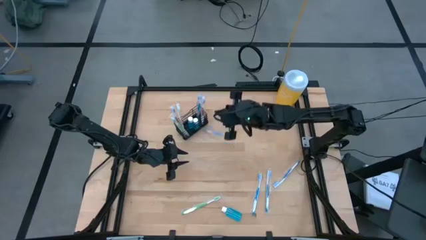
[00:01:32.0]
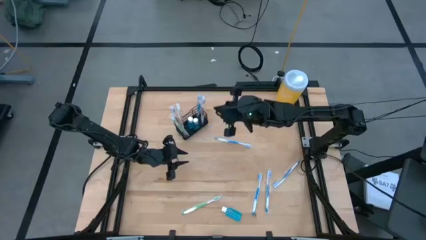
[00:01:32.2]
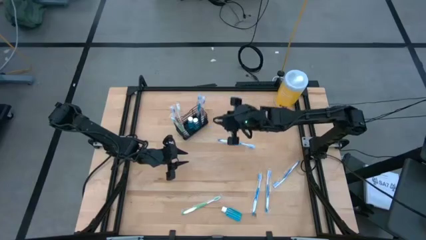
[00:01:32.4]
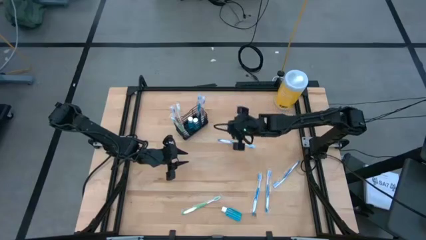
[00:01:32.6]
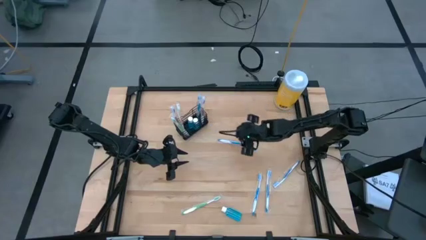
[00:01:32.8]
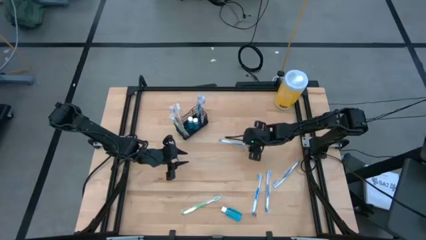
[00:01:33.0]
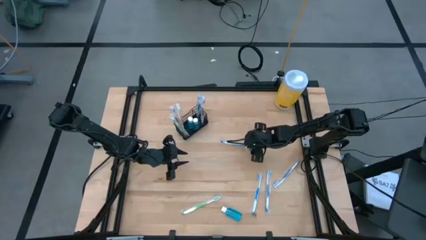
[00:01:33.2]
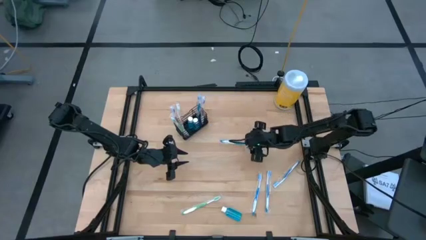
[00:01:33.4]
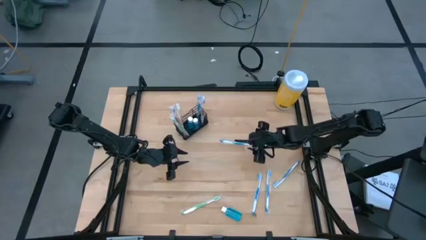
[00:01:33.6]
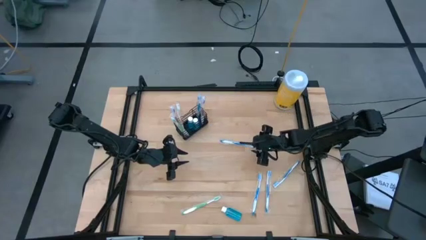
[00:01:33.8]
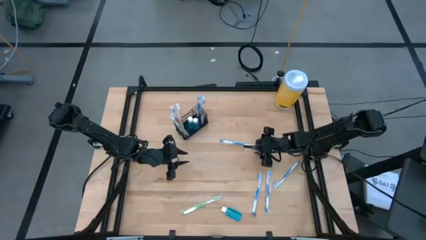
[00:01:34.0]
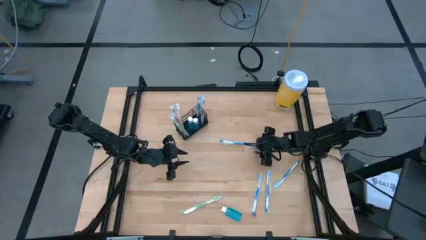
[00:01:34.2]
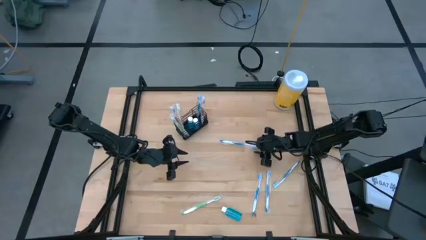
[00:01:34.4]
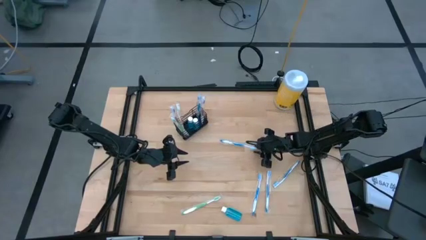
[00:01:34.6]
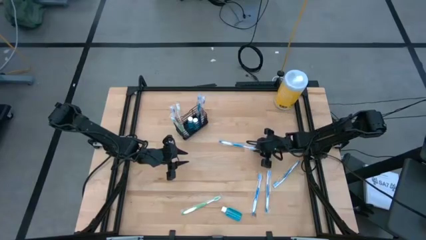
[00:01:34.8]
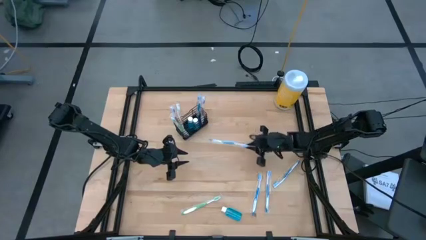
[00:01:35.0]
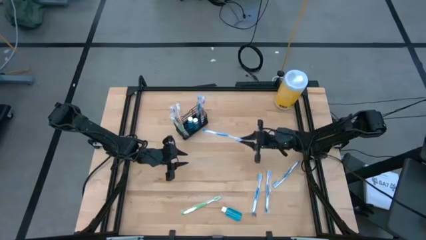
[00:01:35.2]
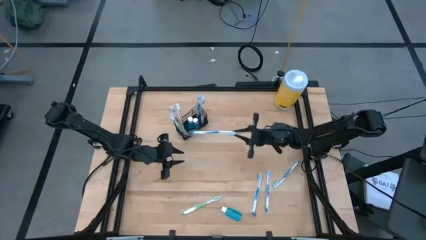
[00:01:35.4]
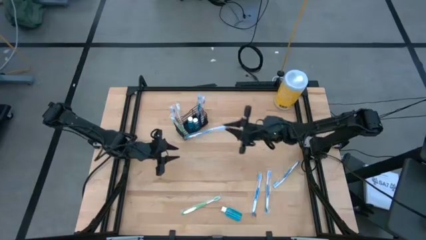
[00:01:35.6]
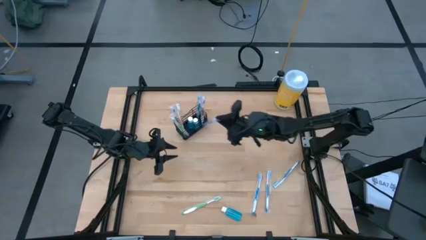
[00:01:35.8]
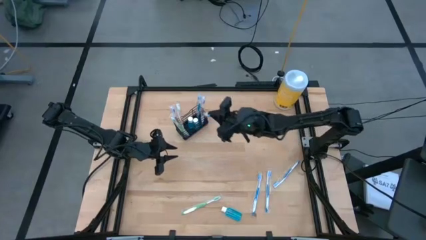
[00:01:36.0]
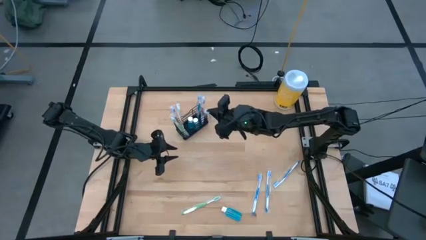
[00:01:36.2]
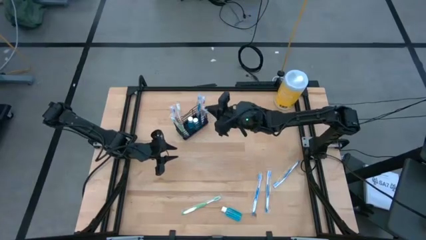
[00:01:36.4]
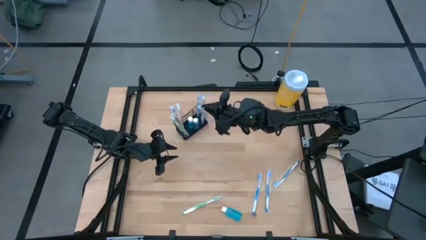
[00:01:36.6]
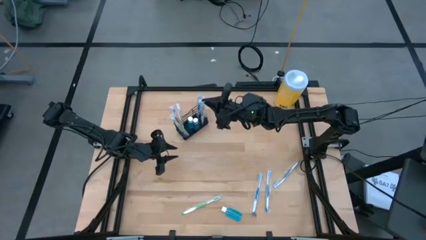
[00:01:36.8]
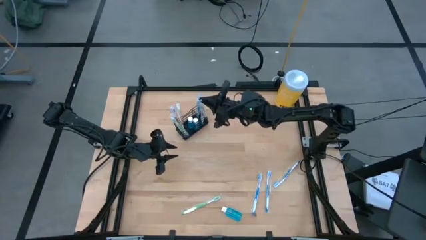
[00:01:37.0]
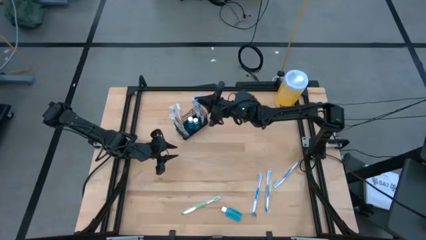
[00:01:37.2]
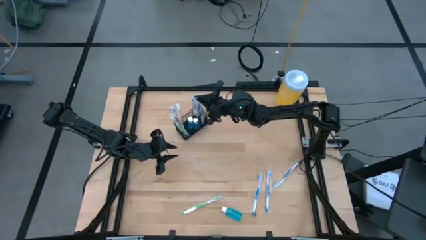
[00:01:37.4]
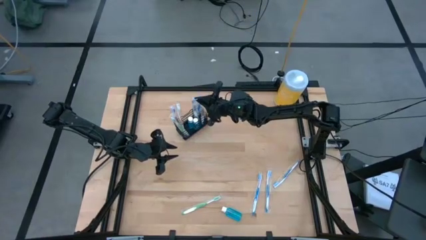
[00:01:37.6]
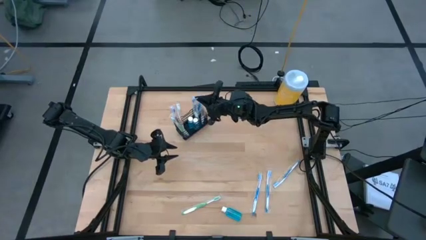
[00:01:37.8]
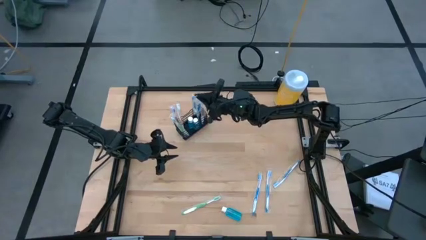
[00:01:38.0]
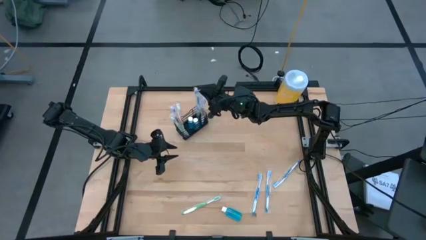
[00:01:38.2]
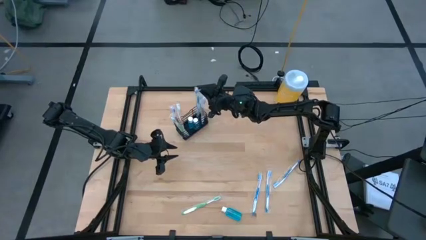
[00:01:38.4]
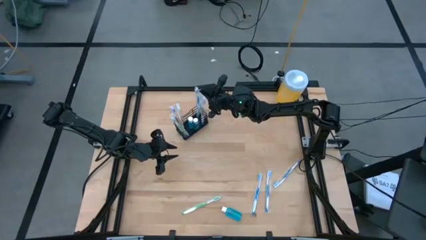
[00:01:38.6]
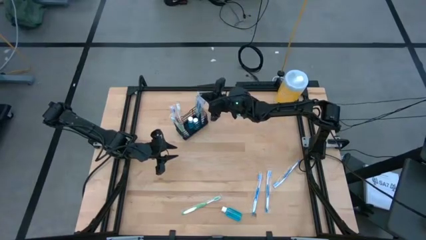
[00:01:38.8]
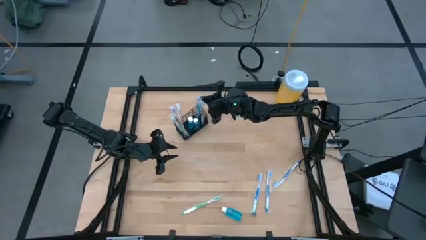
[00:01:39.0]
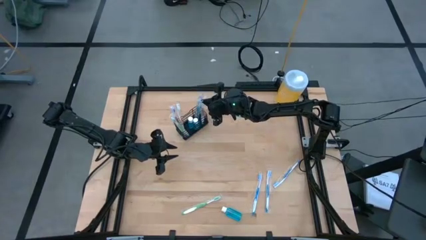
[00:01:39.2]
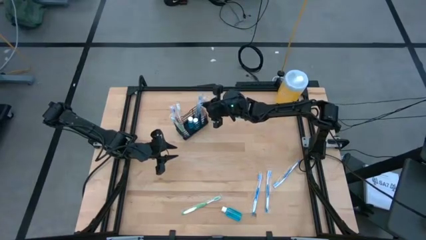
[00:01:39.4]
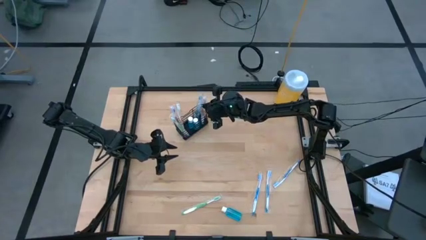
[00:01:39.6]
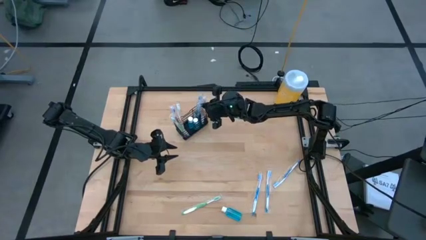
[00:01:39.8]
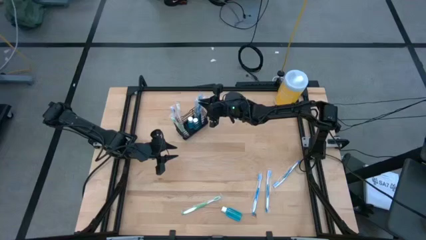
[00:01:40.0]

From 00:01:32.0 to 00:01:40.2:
Task: Pick & Place toothbrushing station
Put the blue toothbrush into the black wire organizer

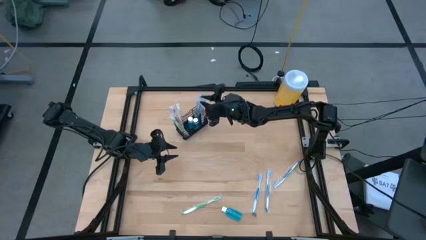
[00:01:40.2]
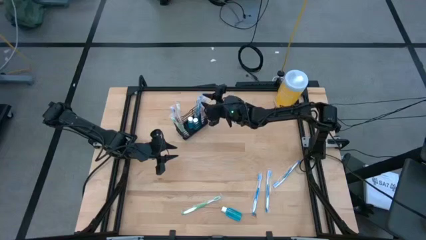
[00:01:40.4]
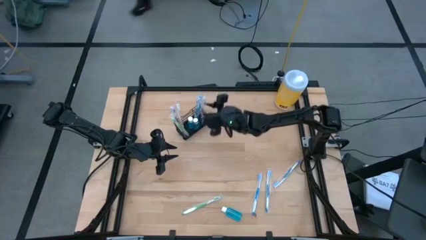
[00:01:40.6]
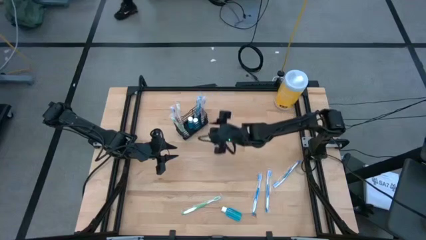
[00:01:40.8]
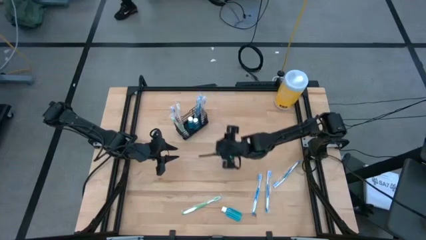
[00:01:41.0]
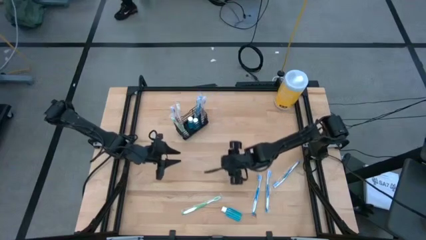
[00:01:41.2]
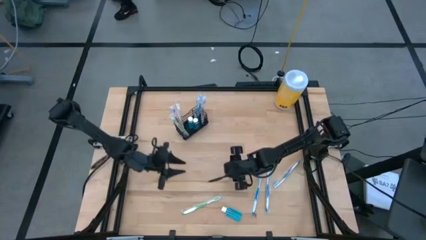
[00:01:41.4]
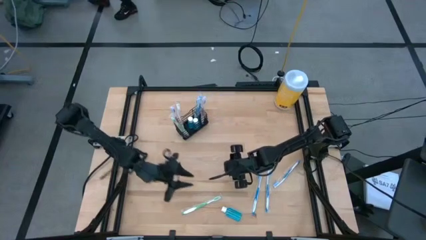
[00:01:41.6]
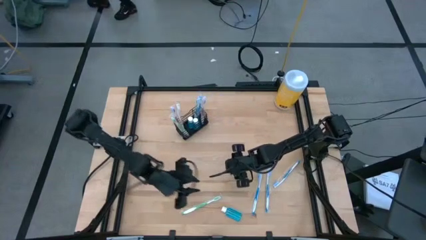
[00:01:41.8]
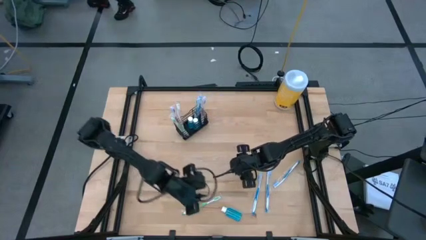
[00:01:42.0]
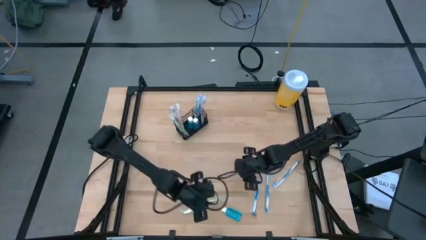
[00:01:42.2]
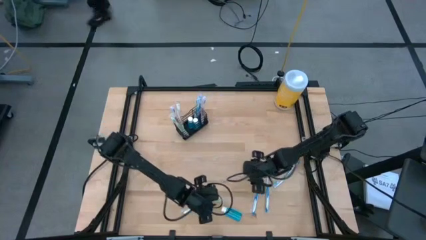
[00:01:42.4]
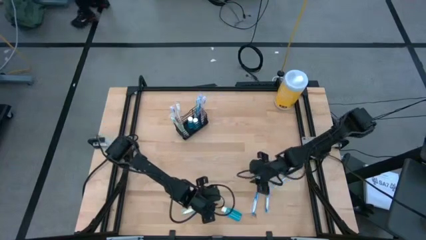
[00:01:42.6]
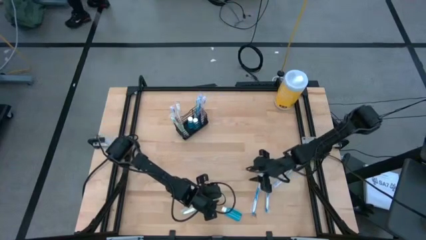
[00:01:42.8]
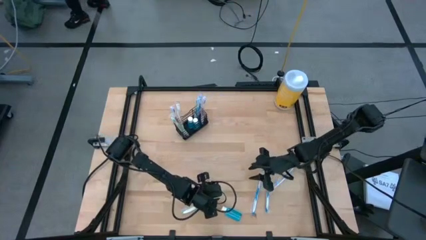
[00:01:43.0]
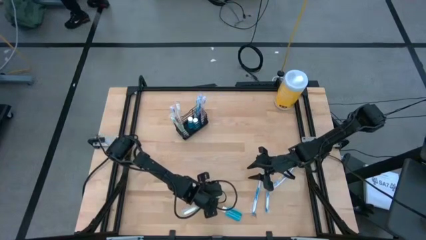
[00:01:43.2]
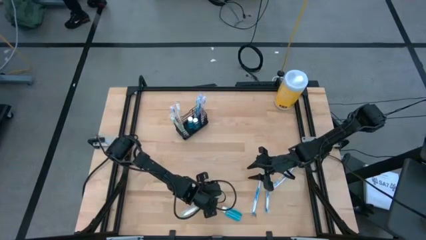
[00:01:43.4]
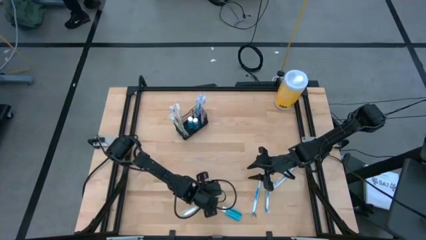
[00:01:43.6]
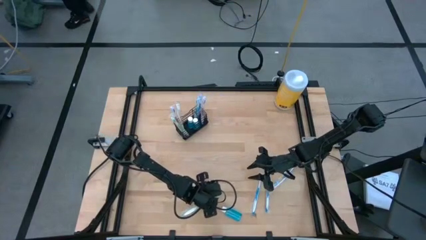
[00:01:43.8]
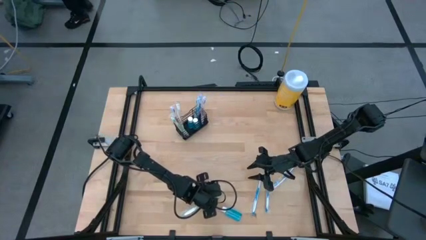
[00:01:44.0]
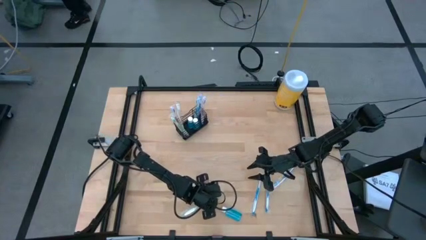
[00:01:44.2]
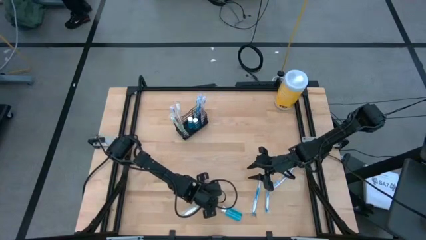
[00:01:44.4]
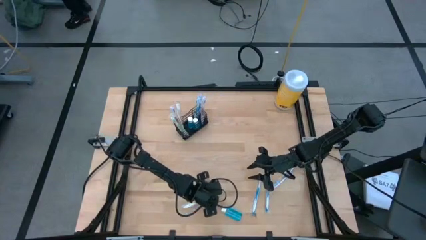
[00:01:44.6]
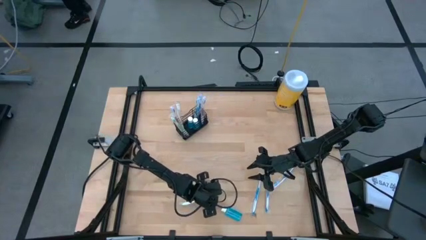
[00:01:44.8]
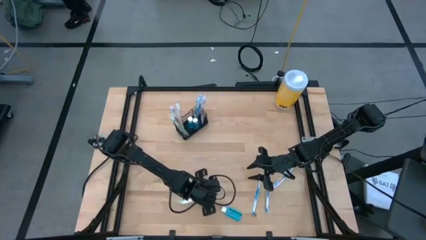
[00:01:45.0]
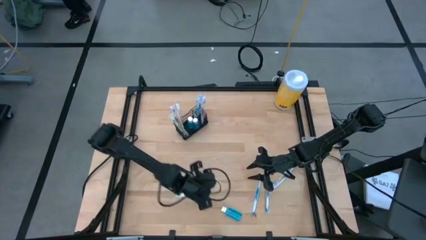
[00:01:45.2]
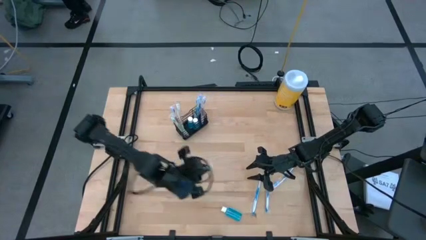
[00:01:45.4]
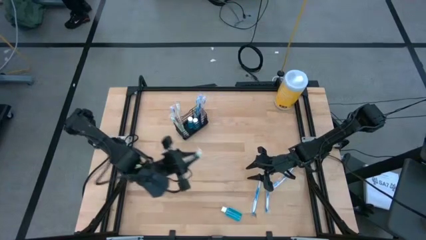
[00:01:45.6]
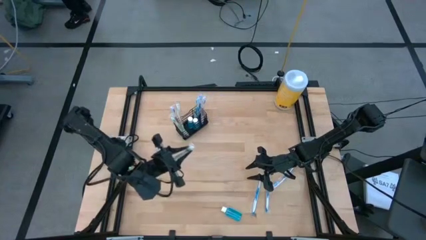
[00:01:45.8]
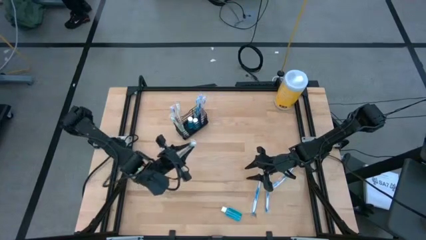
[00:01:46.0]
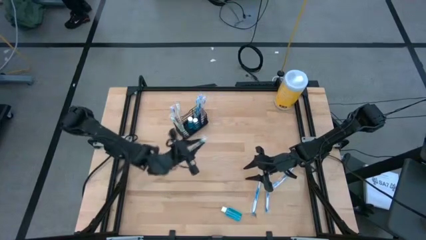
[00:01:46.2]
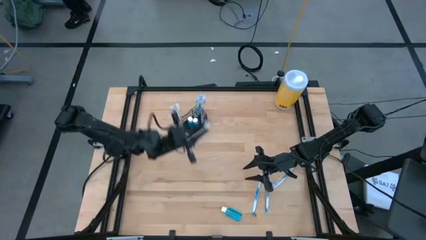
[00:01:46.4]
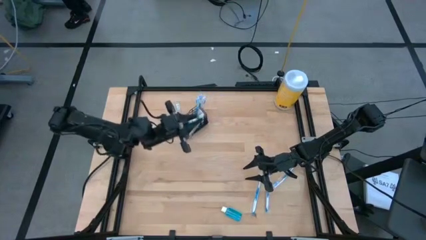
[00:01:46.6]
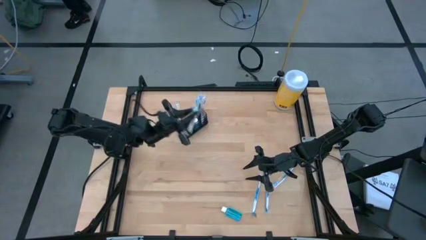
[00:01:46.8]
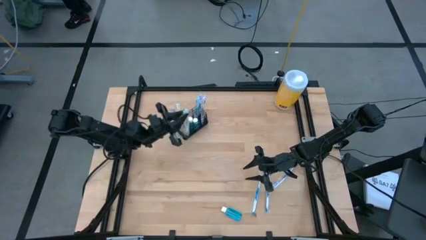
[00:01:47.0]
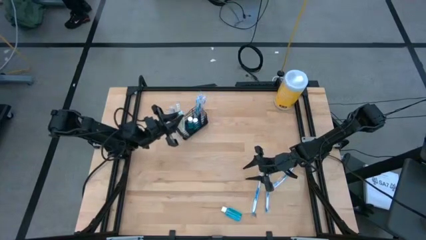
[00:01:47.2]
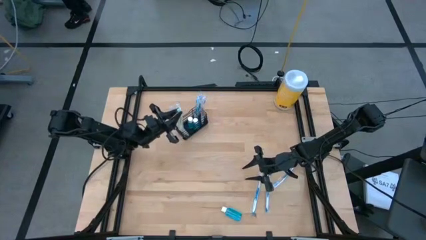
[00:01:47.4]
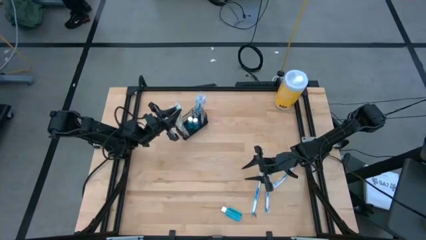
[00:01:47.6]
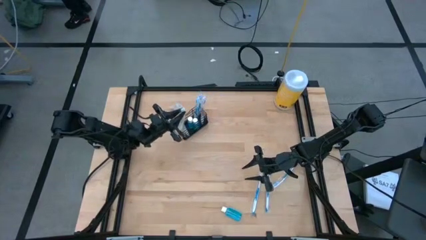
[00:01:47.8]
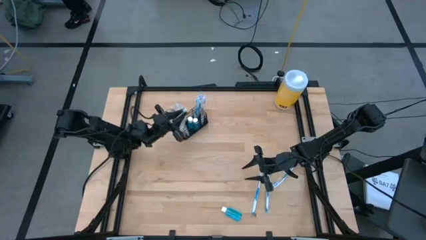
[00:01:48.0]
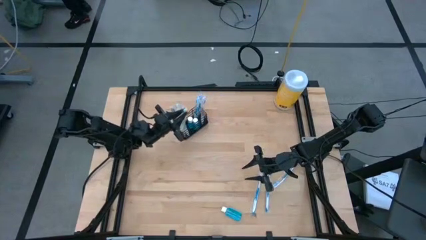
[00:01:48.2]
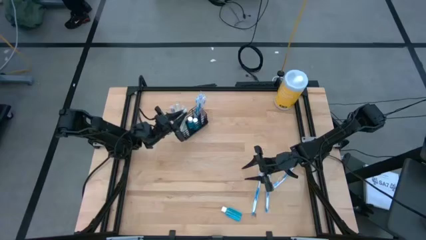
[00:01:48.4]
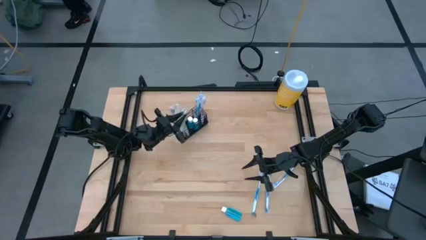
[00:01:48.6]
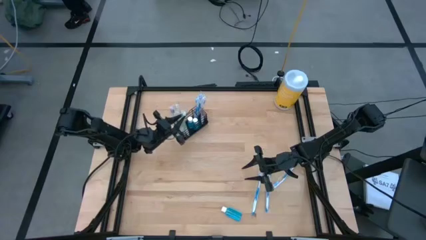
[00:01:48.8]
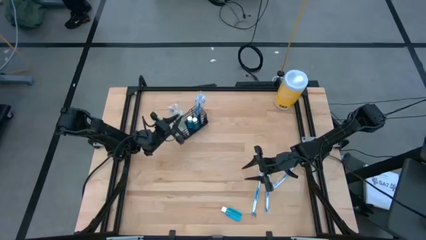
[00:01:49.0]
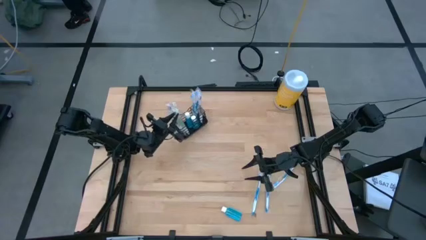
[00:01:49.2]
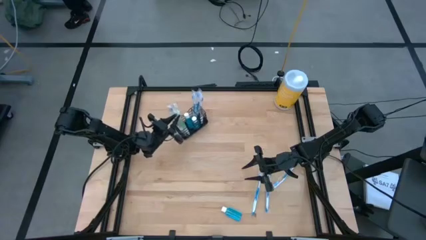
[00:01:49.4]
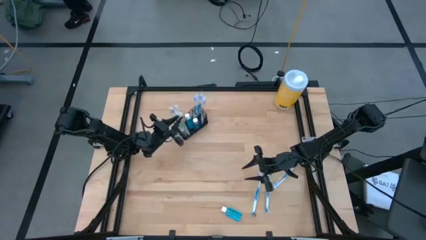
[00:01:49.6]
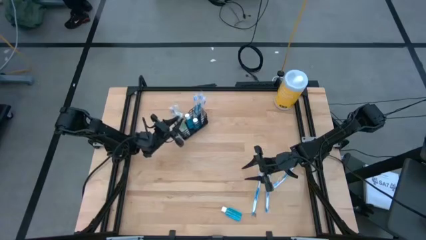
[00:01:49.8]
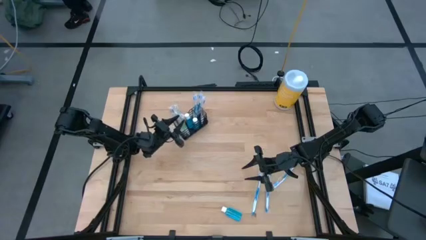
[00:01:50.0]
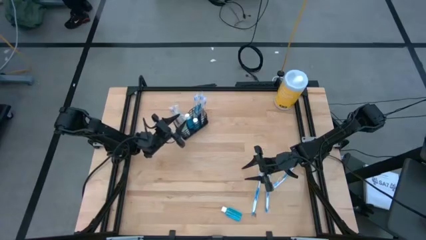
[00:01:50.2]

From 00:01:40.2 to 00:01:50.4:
Put the green toothbrush into the black wire organizer
